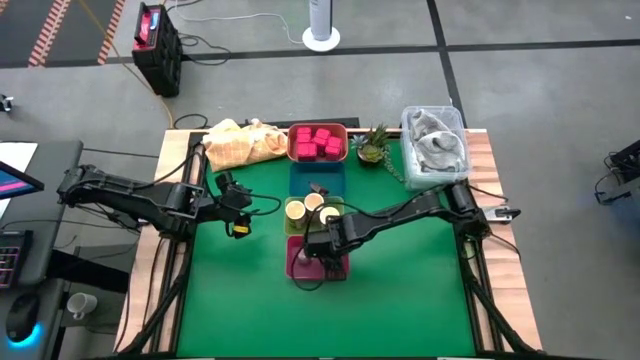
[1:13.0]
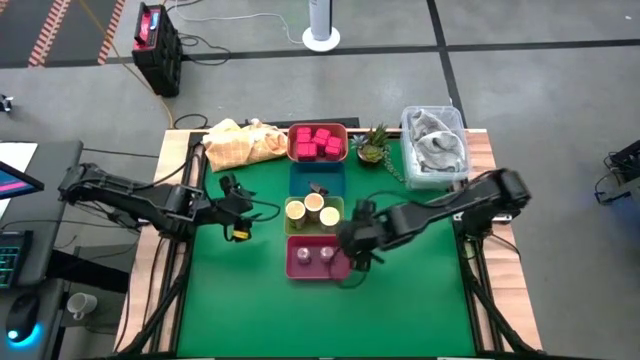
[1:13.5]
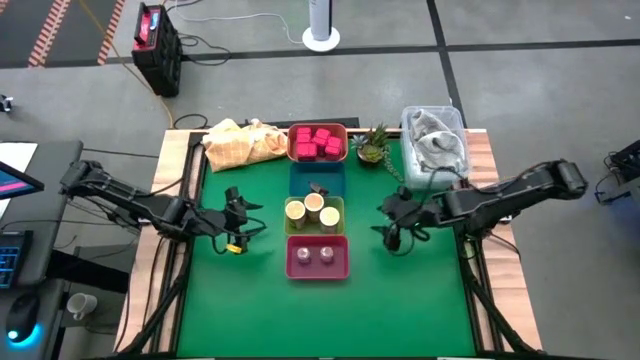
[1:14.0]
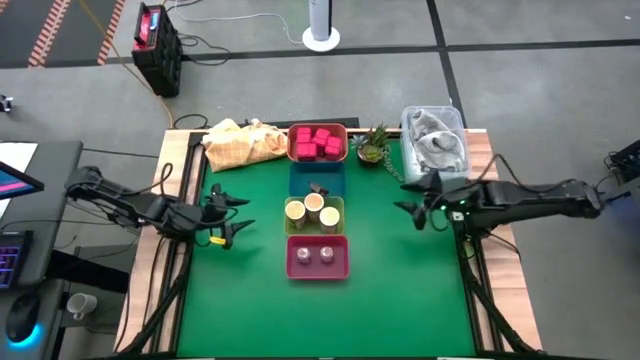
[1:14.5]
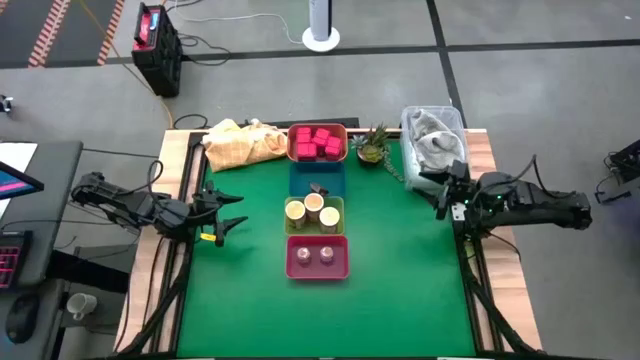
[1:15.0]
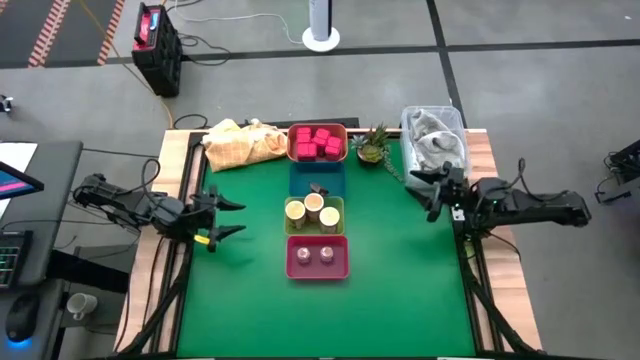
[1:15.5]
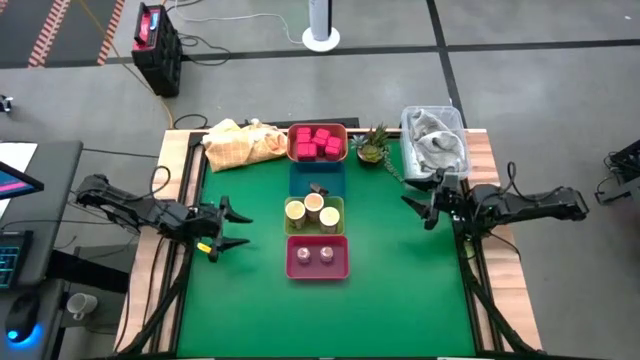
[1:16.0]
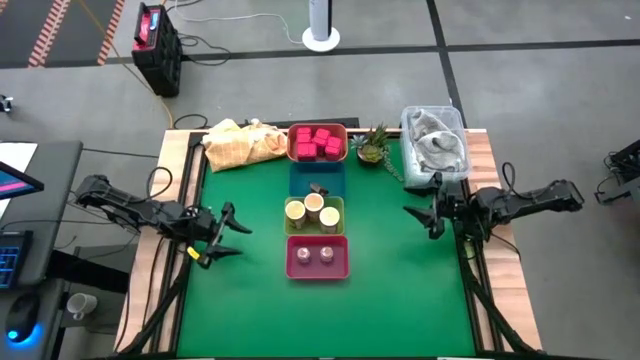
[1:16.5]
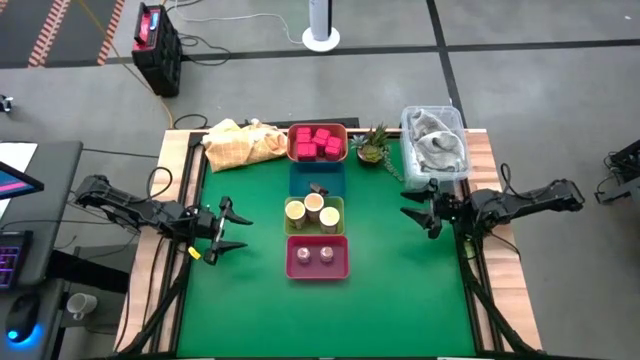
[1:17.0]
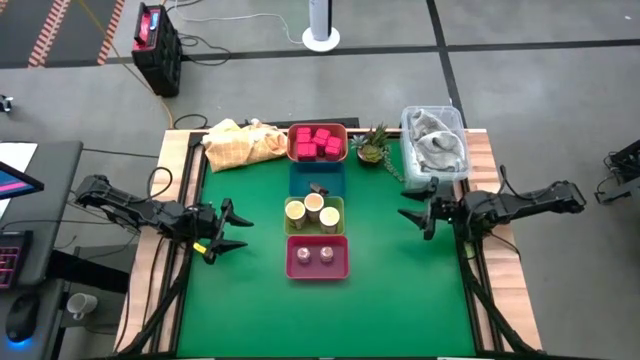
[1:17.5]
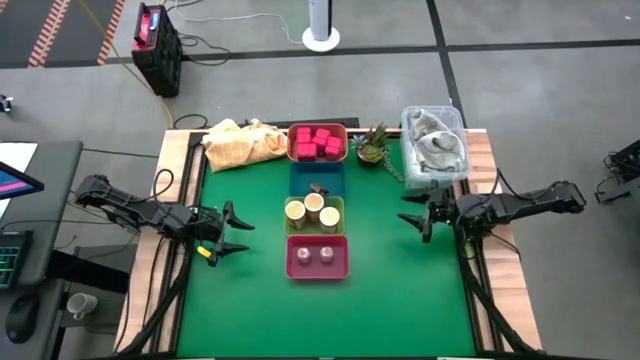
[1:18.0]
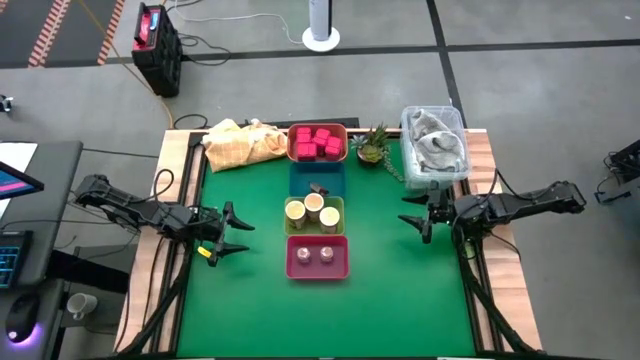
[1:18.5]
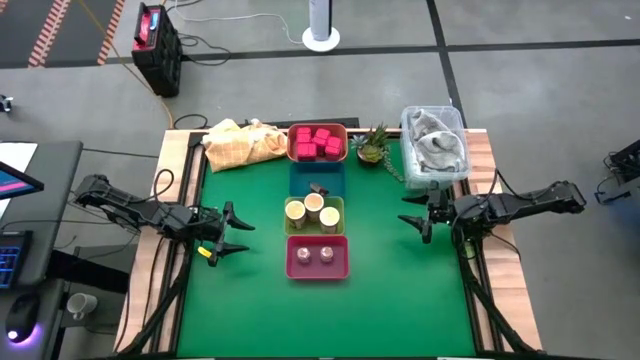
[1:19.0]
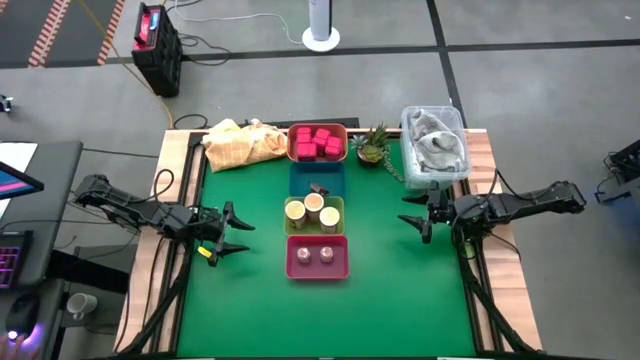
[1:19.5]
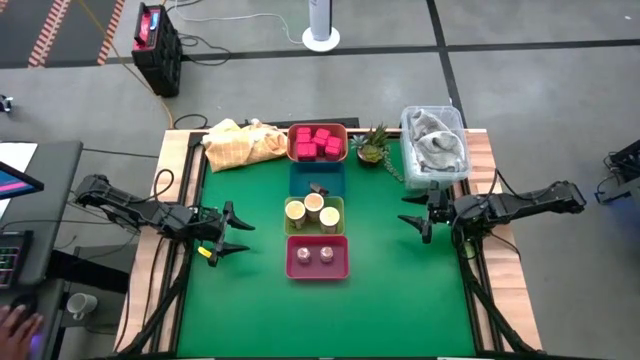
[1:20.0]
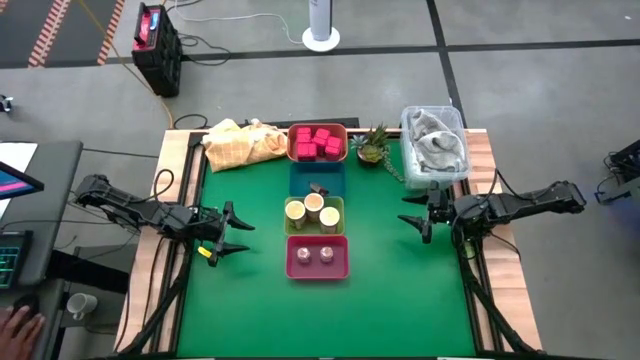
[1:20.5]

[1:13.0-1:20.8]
Task: Sort spices by type
Return to Home Position
